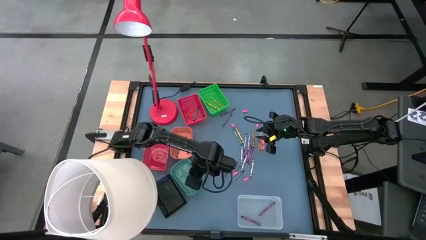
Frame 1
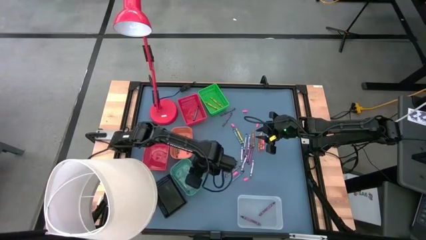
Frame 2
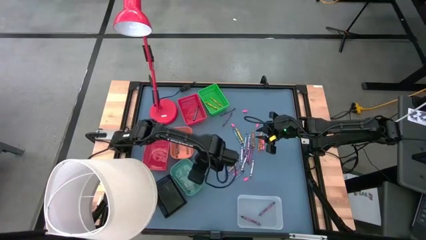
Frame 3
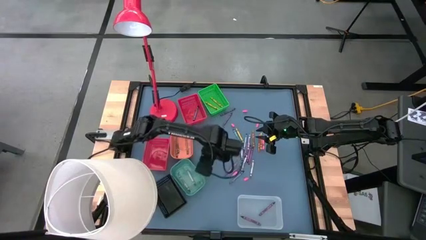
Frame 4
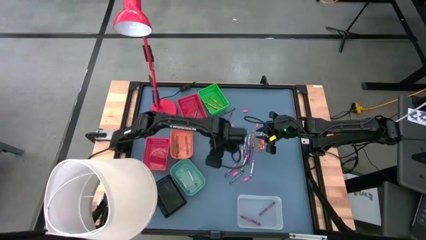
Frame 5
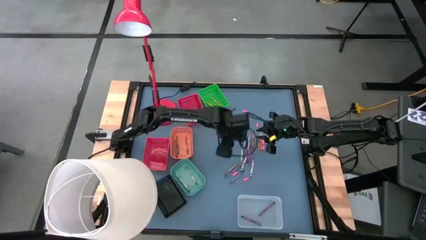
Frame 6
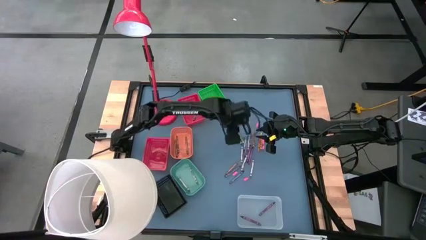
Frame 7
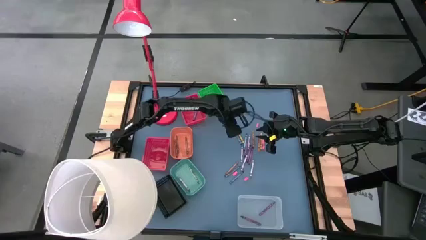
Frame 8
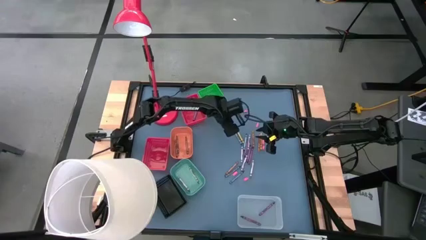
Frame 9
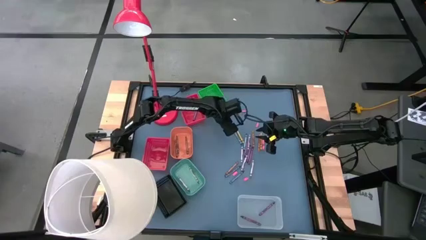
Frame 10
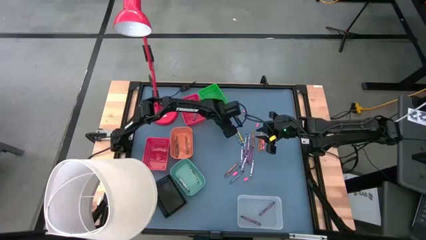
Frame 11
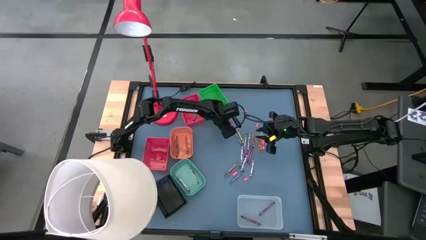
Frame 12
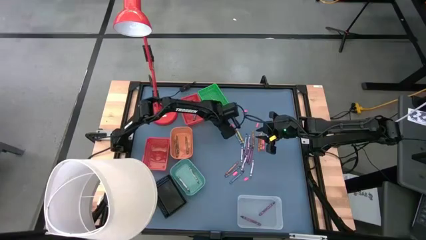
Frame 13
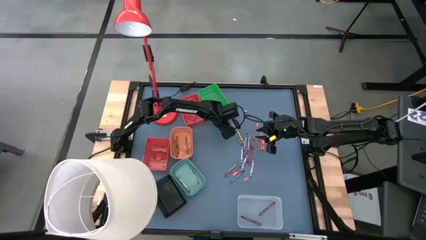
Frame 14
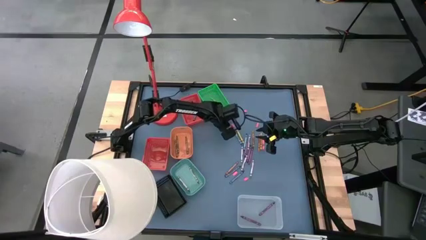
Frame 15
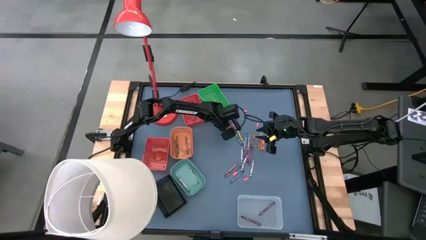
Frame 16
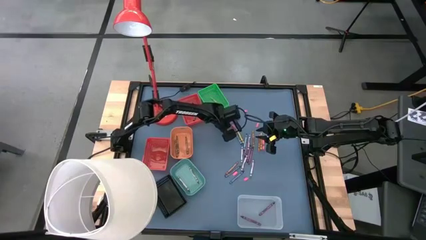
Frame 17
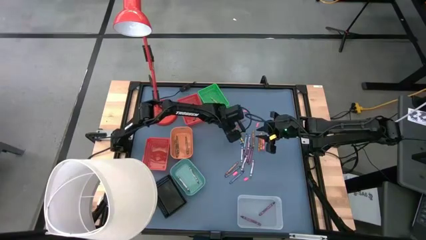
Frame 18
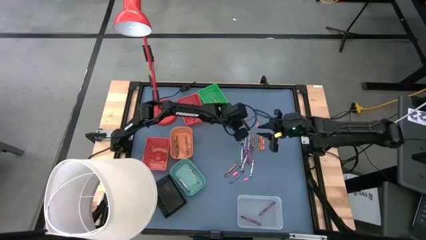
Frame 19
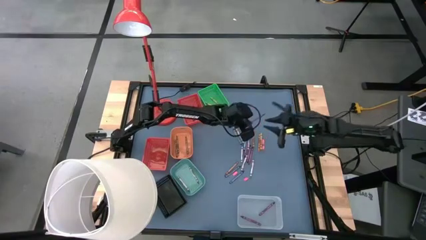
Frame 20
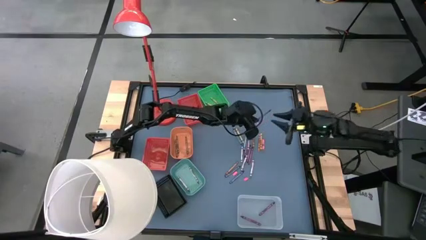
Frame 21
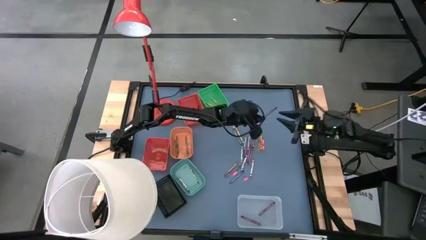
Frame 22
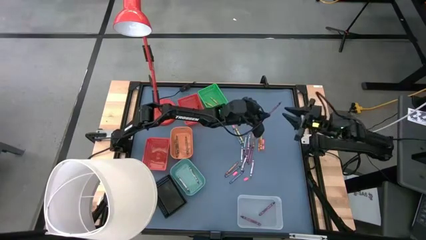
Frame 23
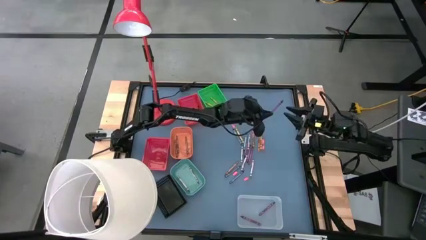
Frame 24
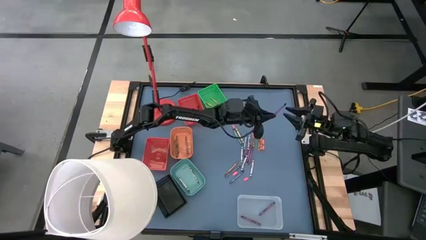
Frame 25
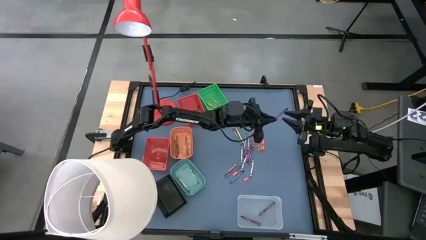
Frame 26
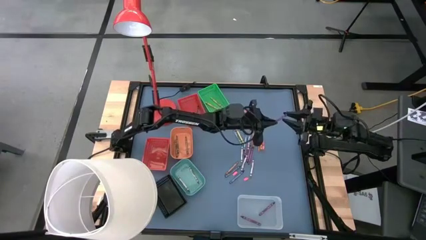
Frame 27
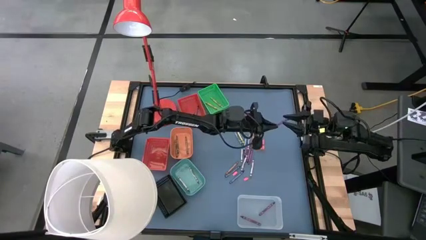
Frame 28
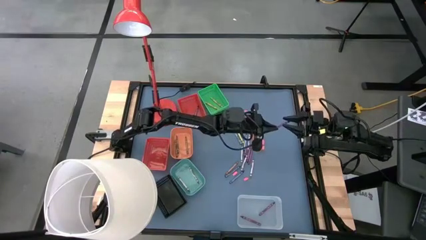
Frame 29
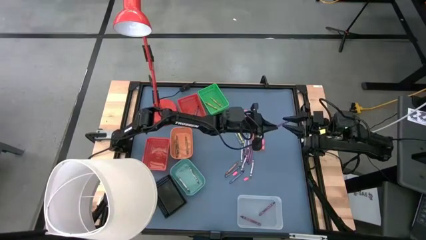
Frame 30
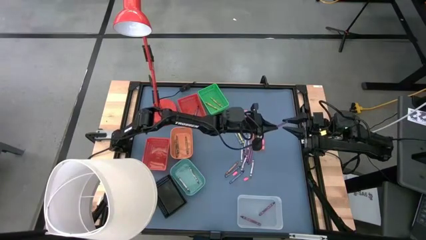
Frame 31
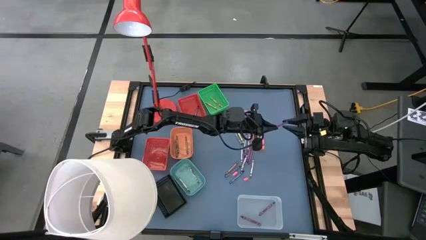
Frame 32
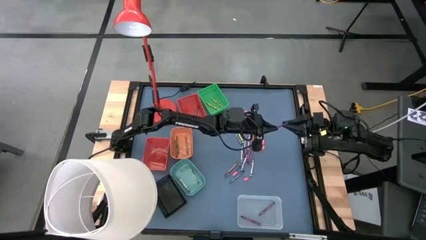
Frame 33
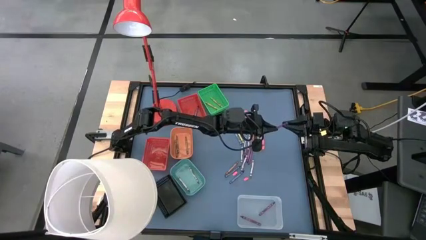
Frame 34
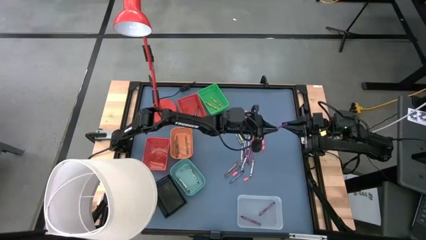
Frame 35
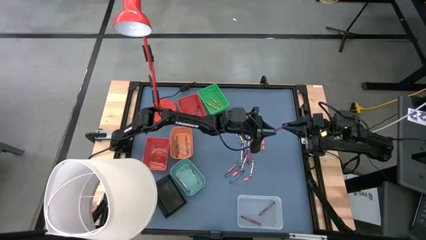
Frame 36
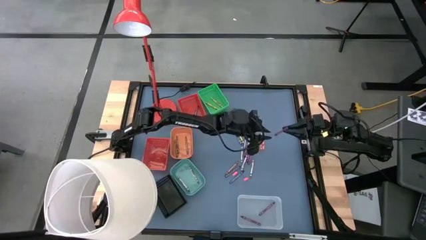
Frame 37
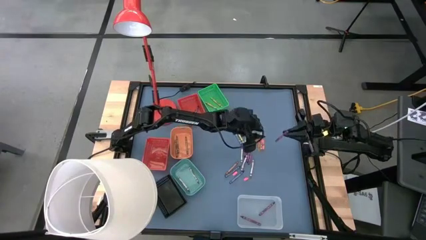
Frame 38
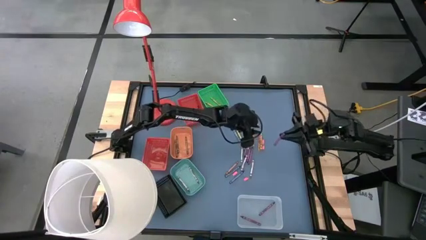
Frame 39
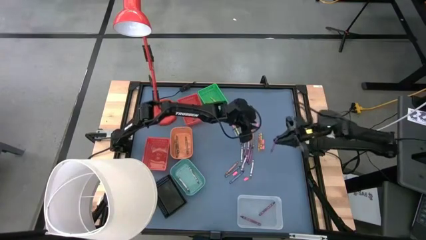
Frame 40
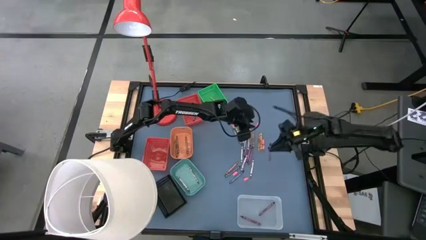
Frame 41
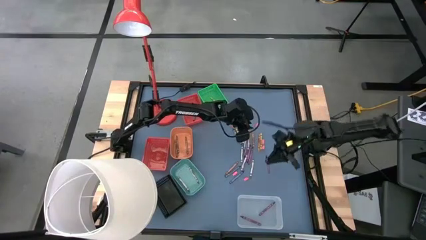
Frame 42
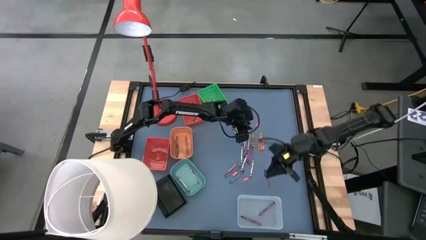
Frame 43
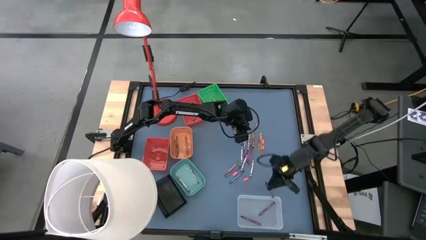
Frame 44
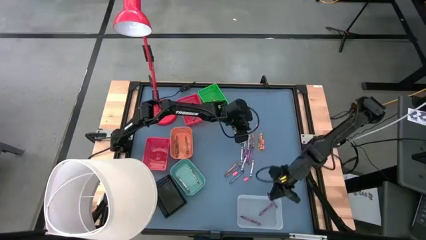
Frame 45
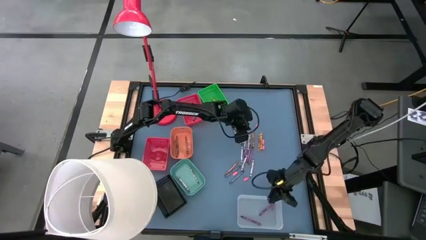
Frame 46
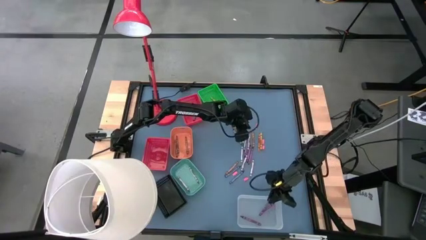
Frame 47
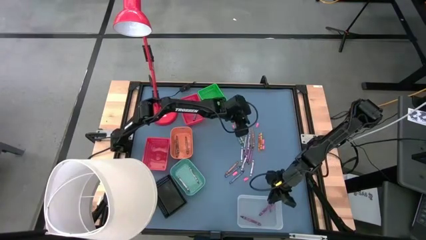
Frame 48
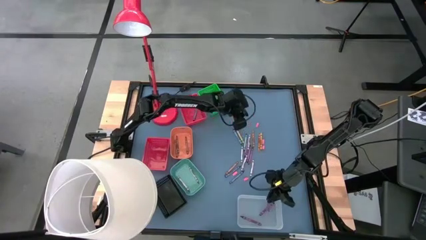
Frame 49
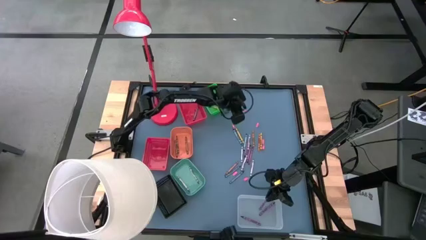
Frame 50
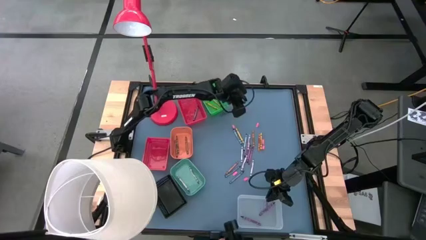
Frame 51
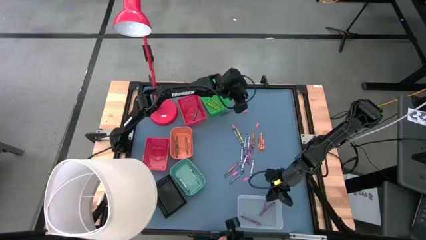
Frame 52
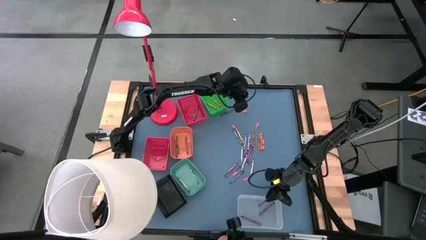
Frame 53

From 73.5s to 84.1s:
Task: Sort crayons
Put the purple crayon into the white bin

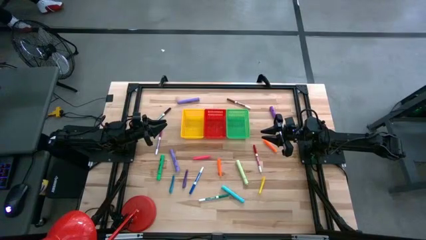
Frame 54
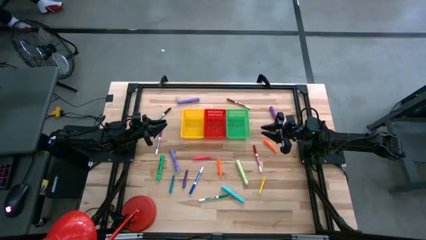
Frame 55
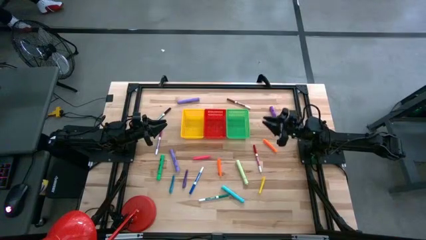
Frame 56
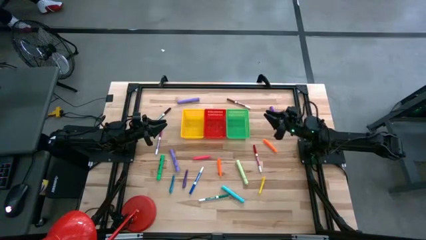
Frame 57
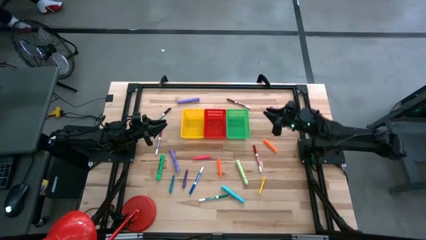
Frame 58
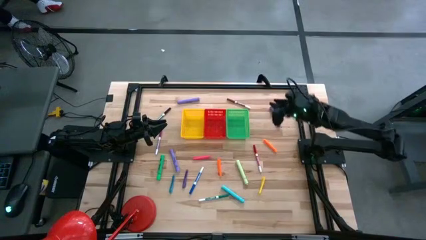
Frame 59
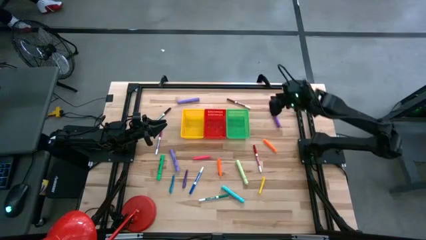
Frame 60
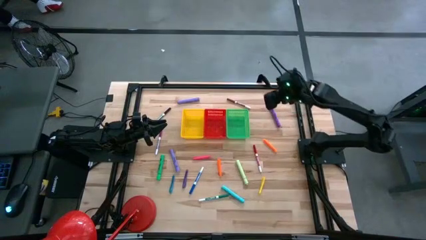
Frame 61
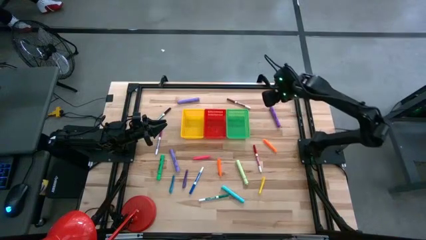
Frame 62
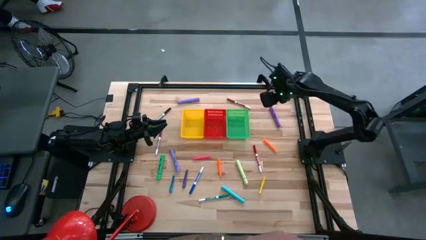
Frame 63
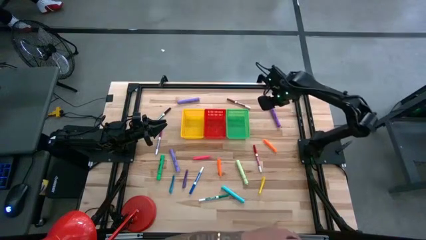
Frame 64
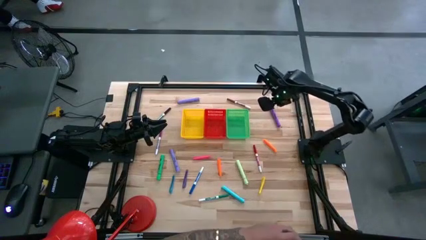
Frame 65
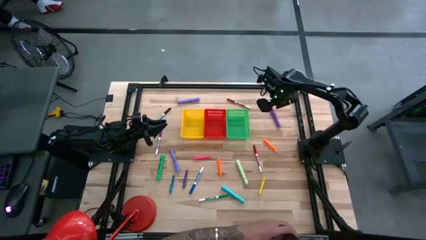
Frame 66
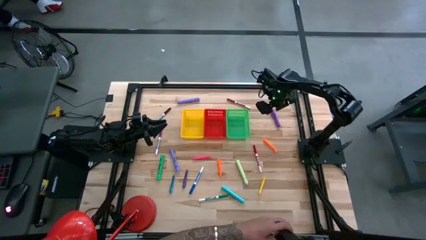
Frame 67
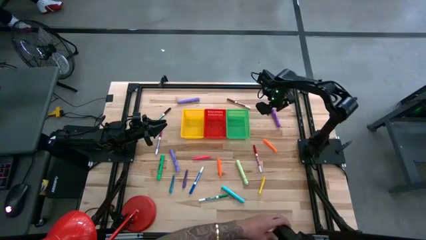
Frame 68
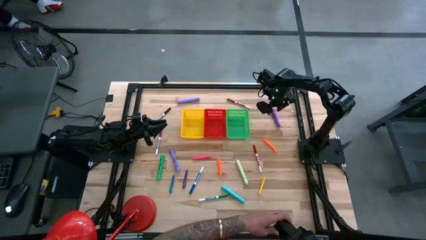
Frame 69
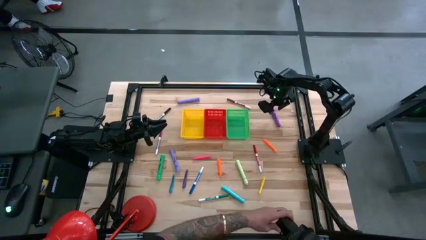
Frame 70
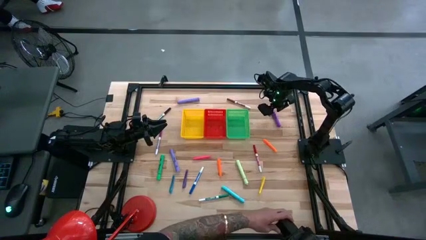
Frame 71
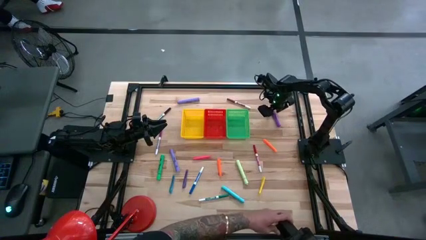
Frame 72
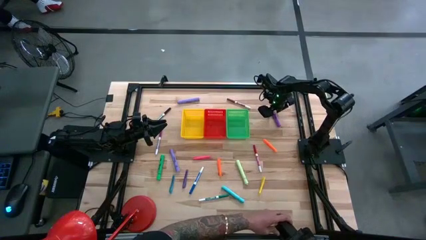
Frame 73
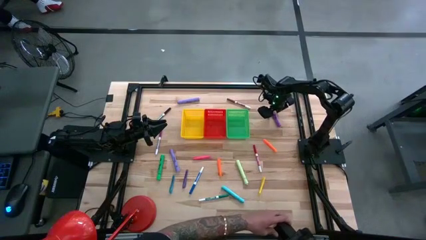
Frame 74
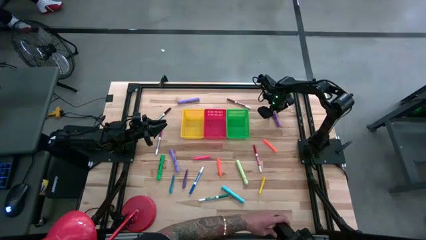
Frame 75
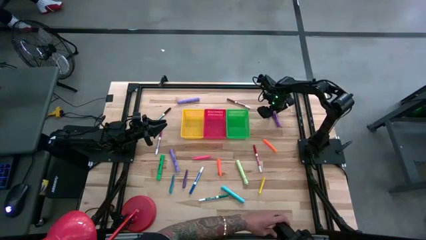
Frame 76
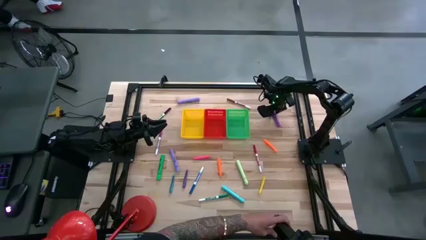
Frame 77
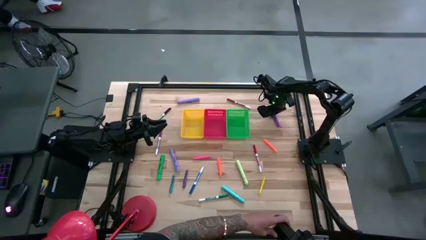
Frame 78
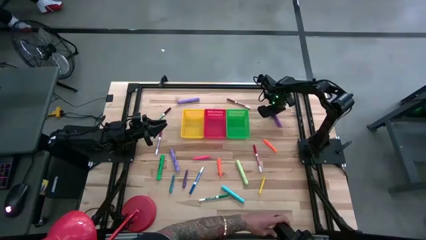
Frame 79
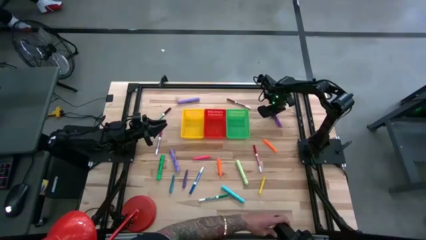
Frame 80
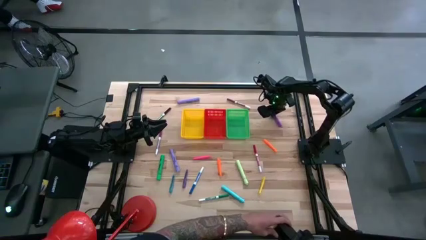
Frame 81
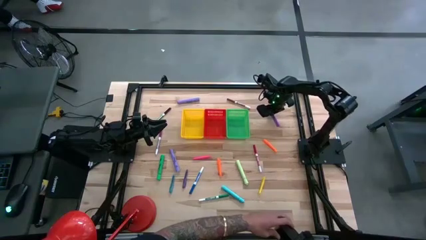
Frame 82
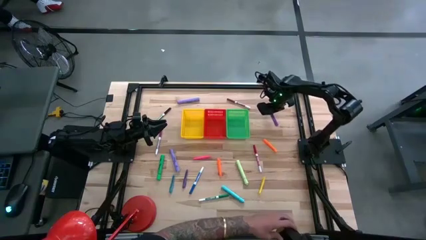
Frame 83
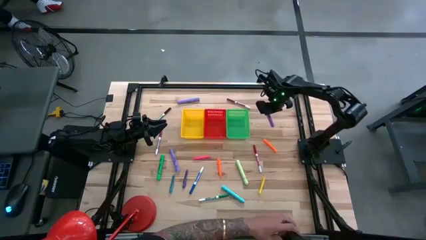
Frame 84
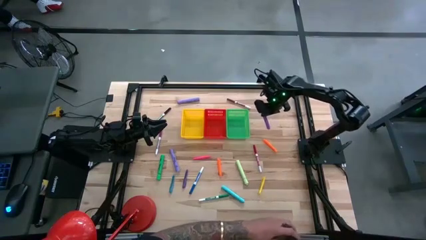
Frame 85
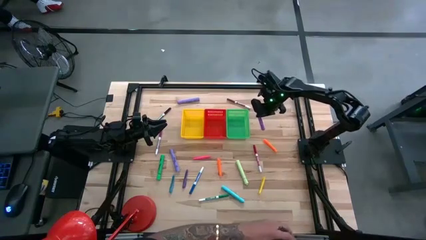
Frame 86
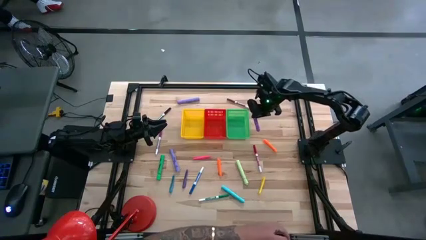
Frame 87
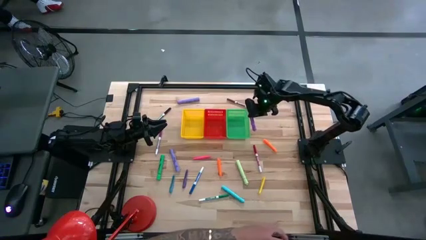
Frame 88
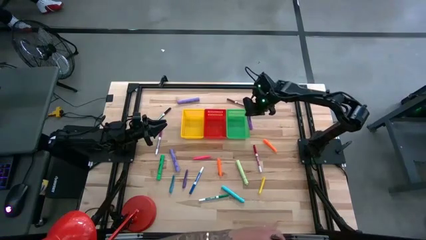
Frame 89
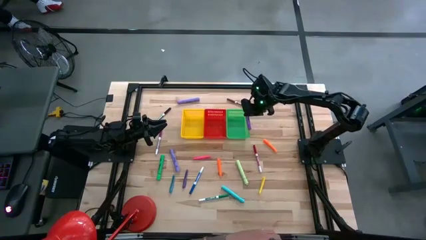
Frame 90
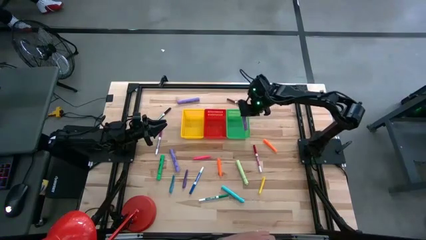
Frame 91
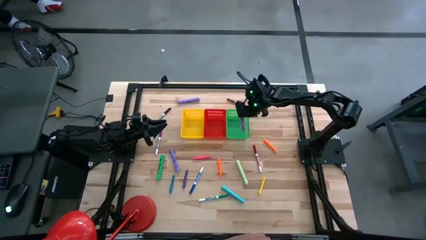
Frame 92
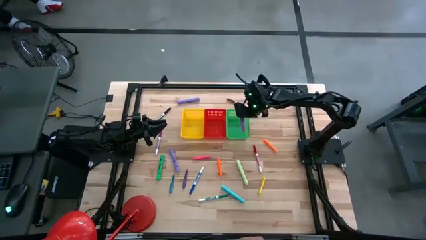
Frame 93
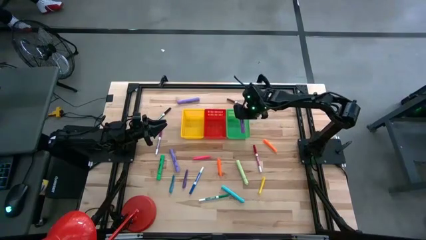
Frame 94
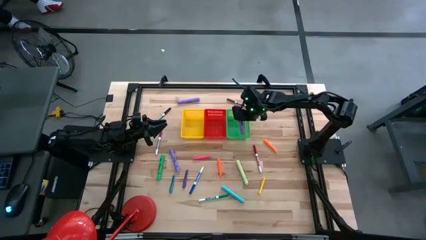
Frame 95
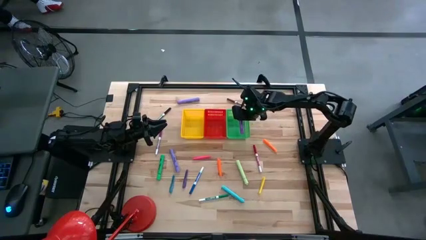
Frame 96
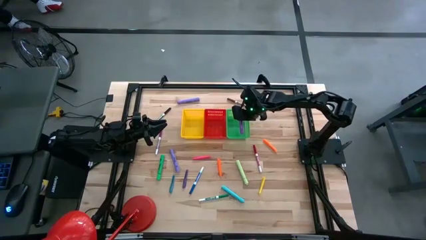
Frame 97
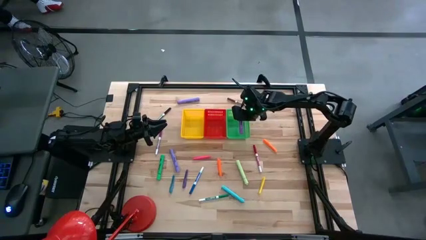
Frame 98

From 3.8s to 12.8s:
Task: Pick & Place Markers
Put the dark purple highlighter into the green bin
